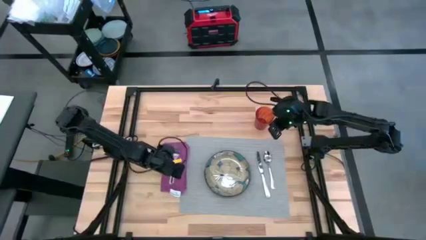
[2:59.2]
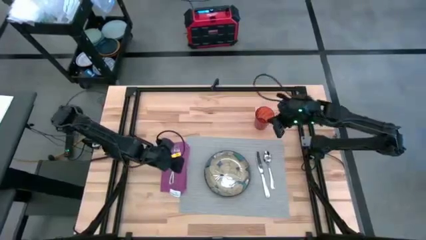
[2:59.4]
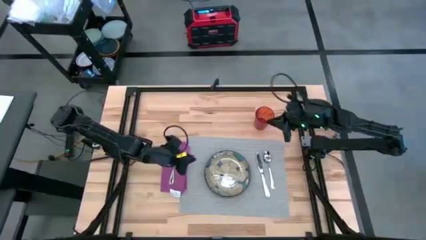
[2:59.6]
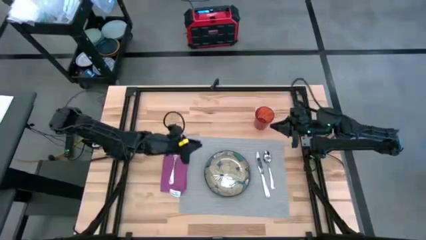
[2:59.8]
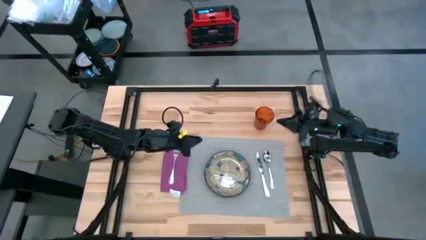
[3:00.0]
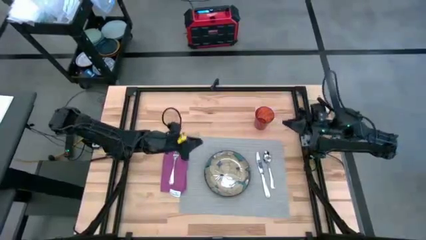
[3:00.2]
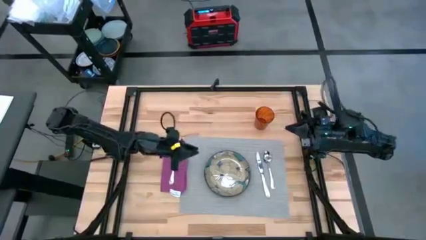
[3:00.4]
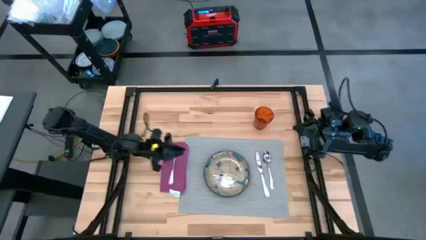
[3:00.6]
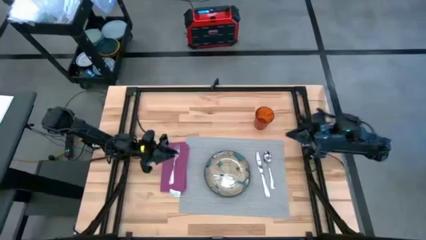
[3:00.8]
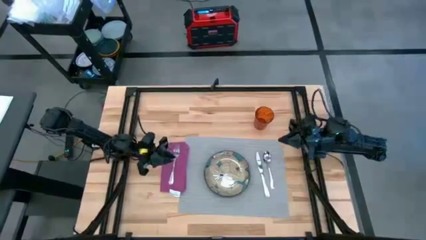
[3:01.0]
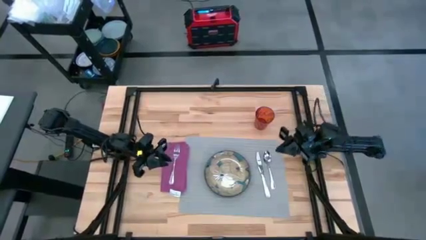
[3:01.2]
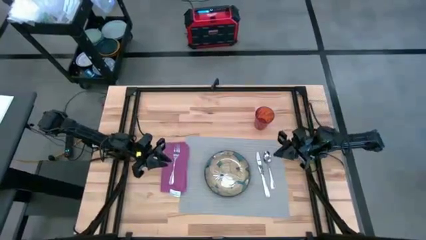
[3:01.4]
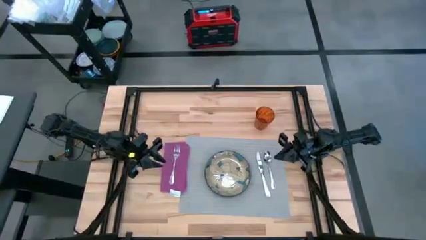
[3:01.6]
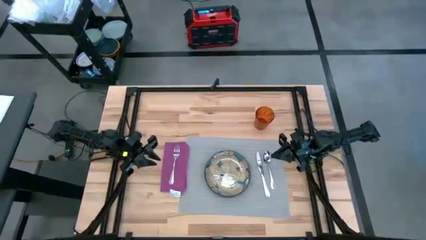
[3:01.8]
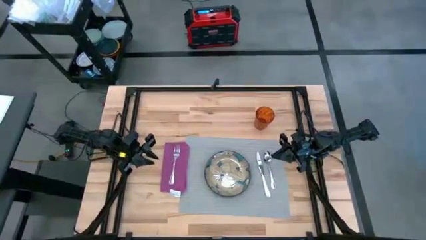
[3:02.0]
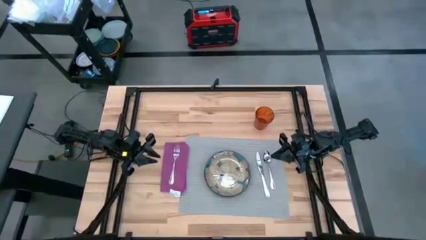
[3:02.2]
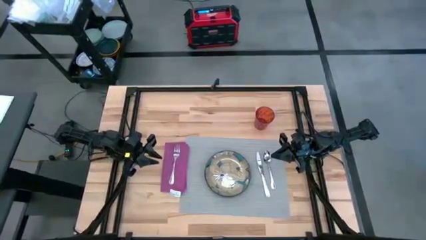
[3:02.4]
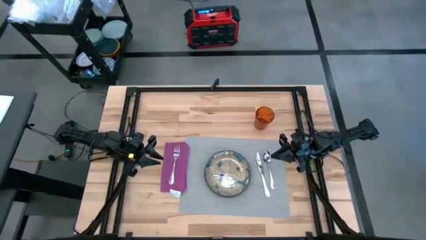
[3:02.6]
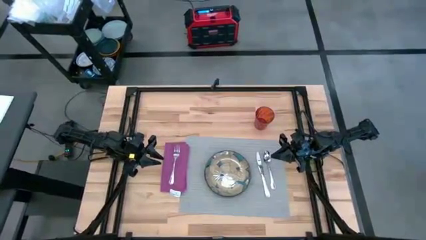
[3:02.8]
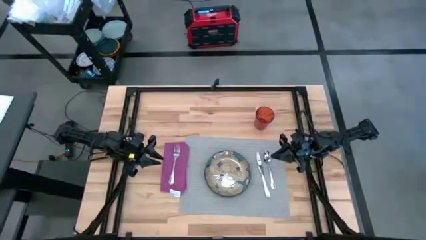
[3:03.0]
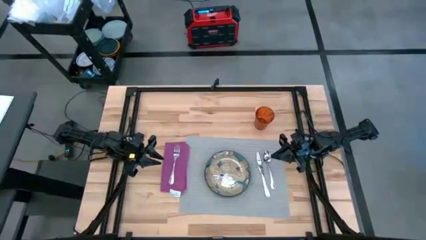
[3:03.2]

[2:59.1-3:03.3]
Task: Set table place
Return to Home Position

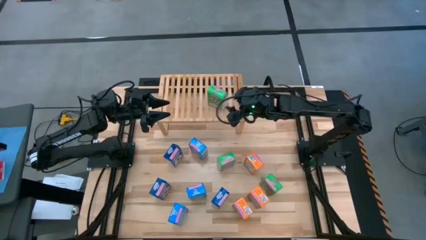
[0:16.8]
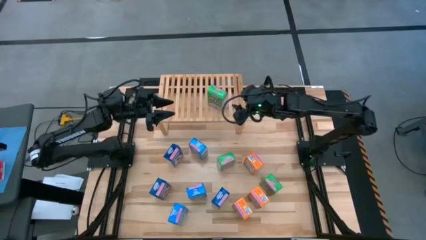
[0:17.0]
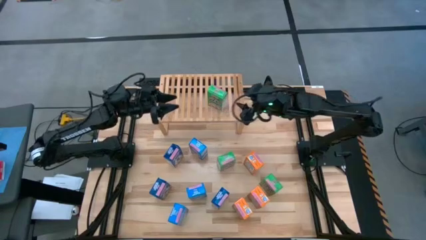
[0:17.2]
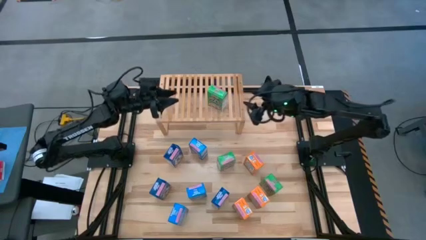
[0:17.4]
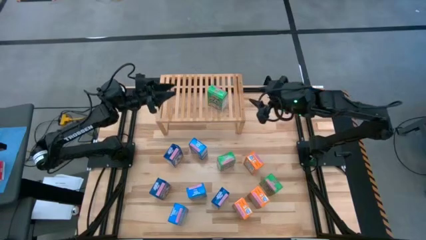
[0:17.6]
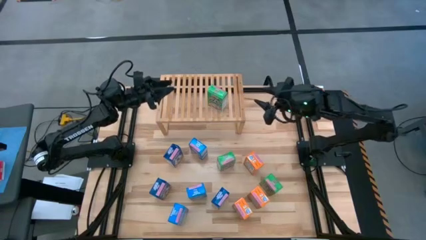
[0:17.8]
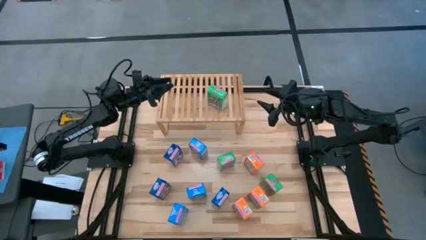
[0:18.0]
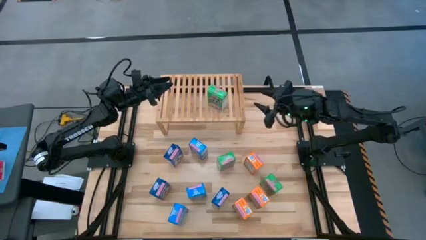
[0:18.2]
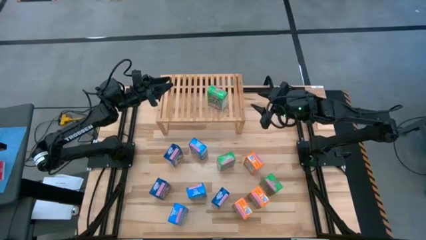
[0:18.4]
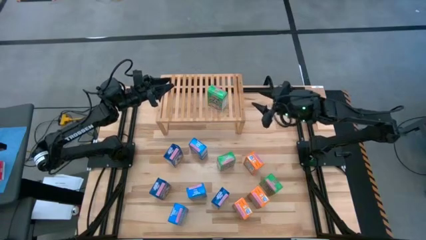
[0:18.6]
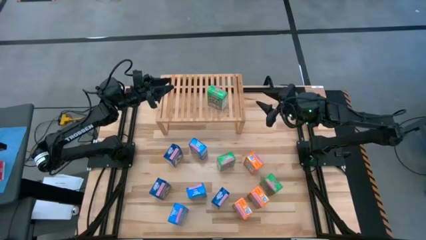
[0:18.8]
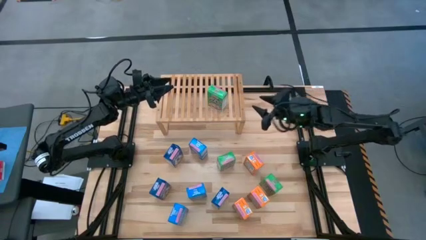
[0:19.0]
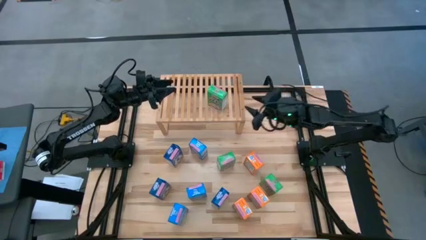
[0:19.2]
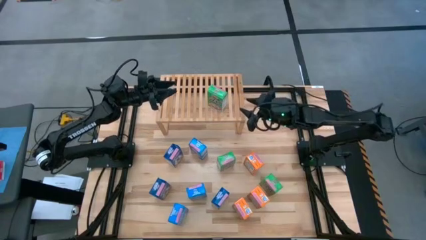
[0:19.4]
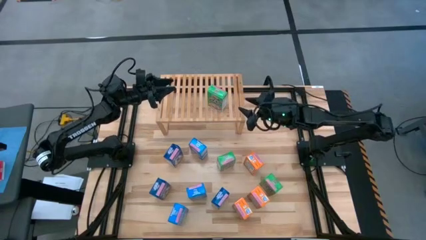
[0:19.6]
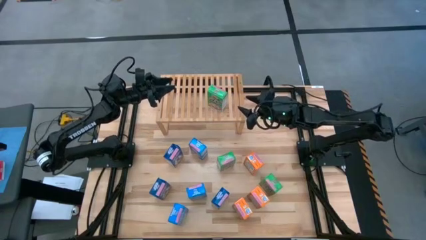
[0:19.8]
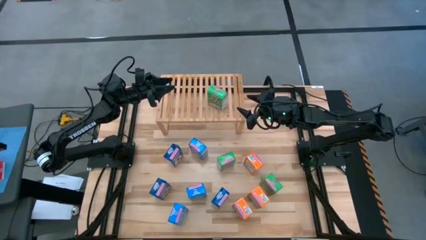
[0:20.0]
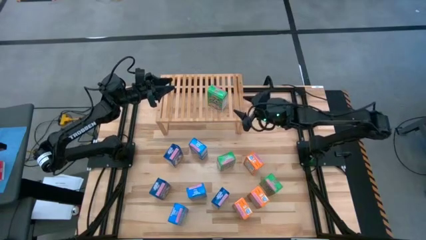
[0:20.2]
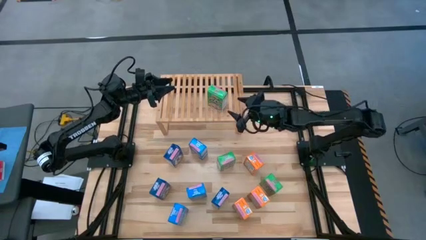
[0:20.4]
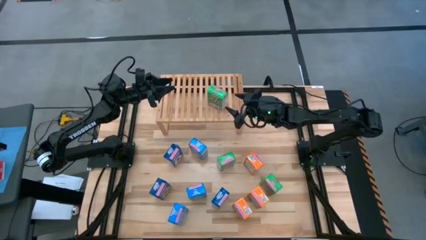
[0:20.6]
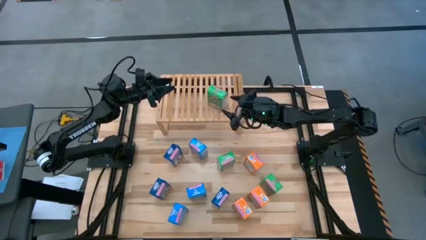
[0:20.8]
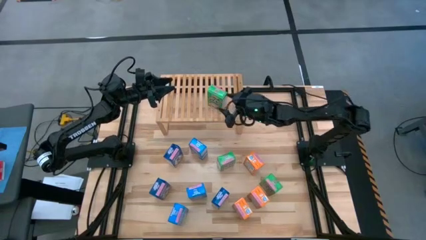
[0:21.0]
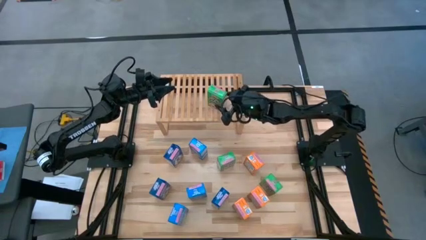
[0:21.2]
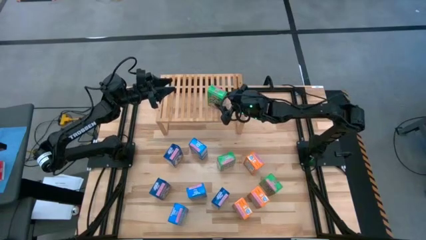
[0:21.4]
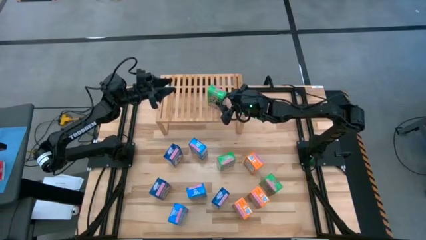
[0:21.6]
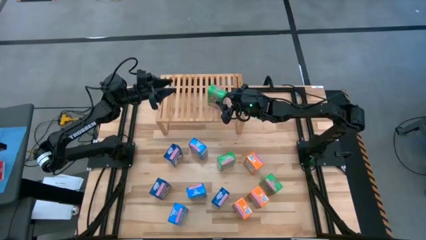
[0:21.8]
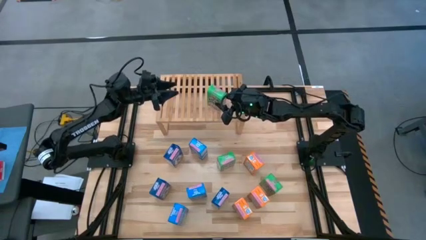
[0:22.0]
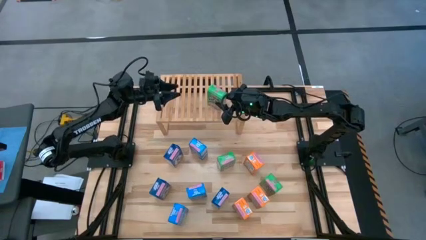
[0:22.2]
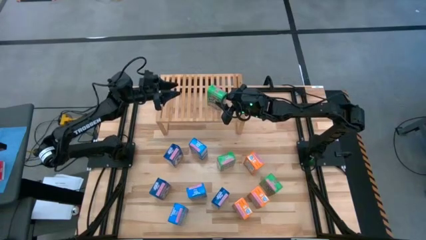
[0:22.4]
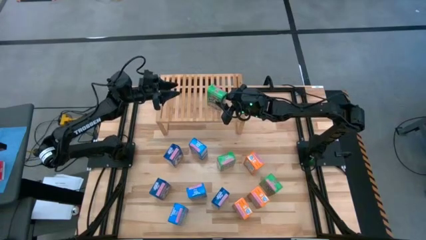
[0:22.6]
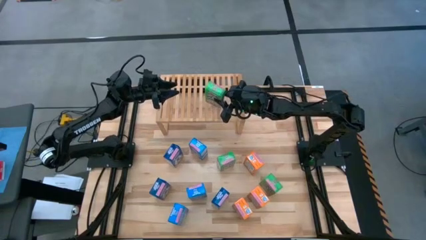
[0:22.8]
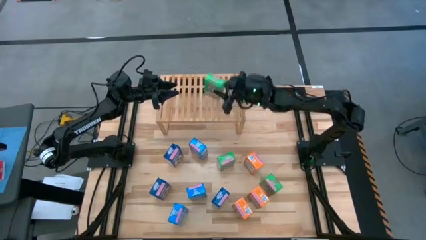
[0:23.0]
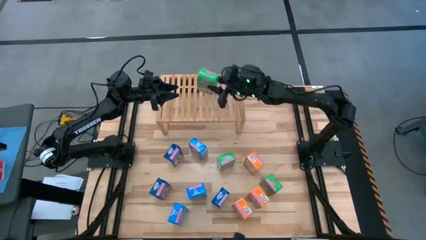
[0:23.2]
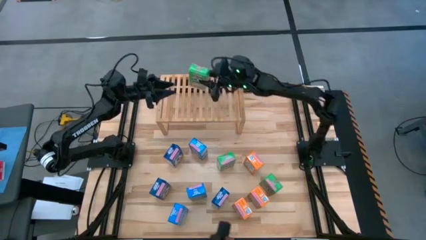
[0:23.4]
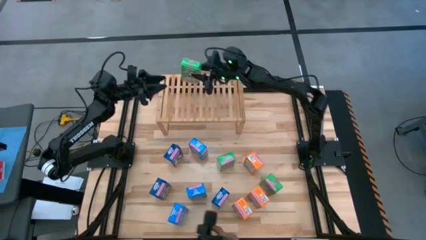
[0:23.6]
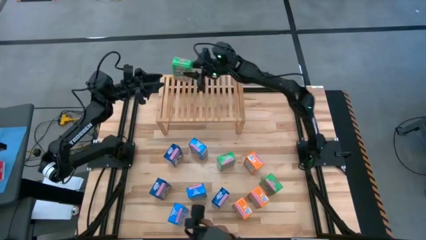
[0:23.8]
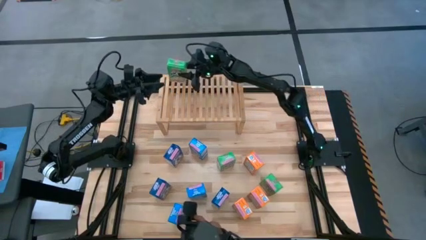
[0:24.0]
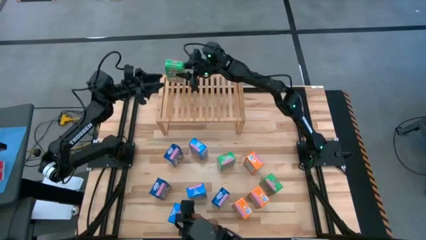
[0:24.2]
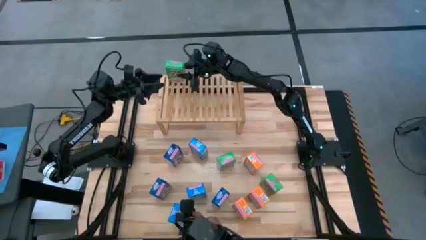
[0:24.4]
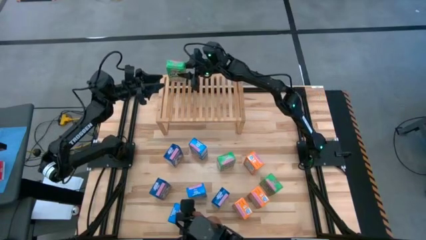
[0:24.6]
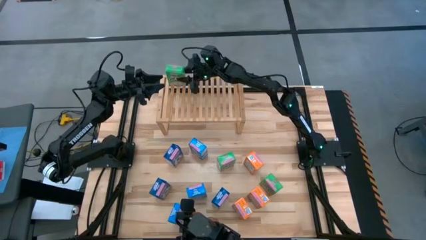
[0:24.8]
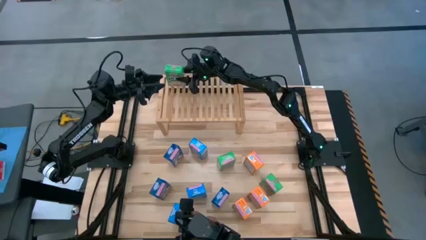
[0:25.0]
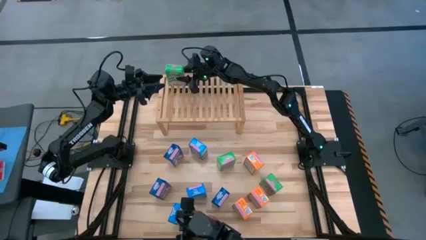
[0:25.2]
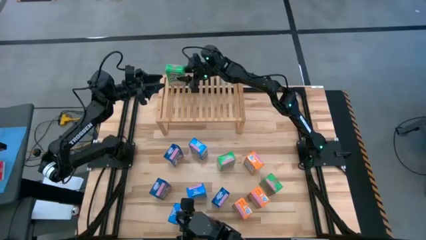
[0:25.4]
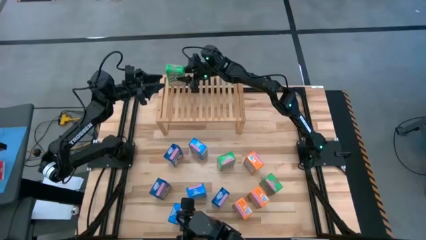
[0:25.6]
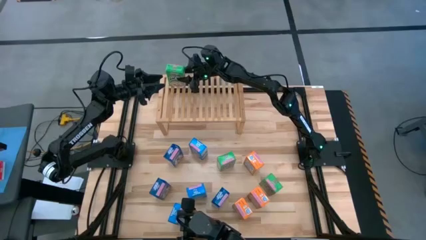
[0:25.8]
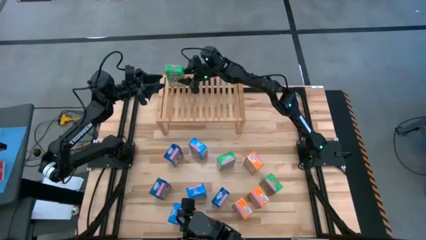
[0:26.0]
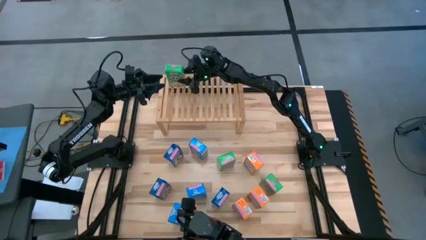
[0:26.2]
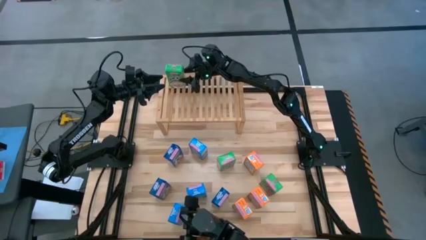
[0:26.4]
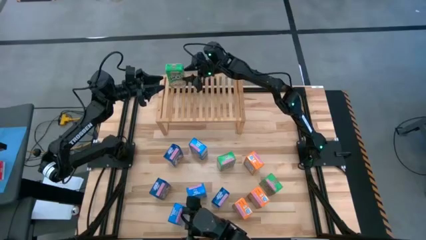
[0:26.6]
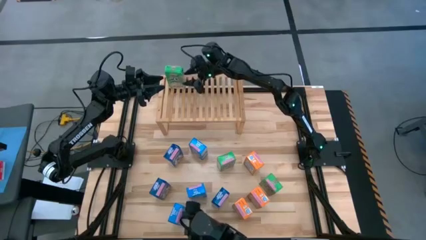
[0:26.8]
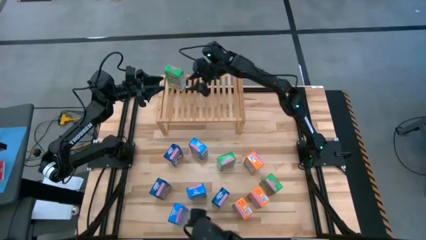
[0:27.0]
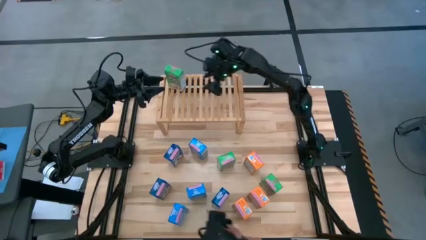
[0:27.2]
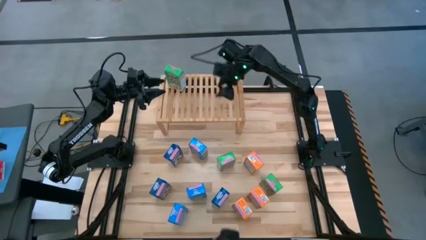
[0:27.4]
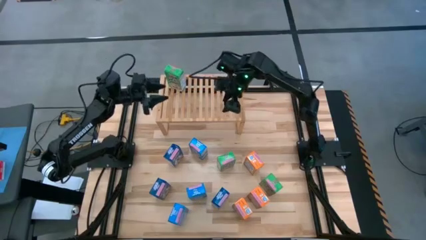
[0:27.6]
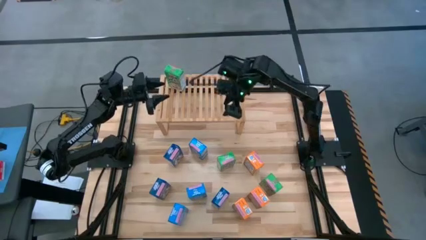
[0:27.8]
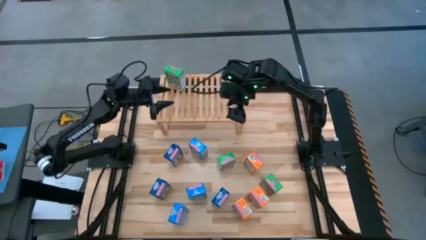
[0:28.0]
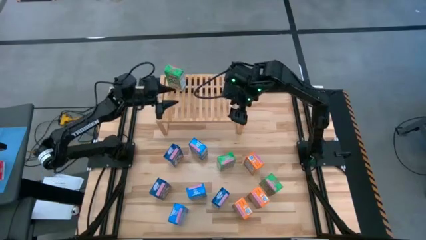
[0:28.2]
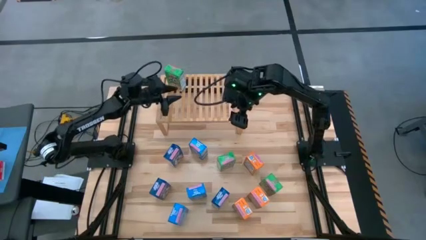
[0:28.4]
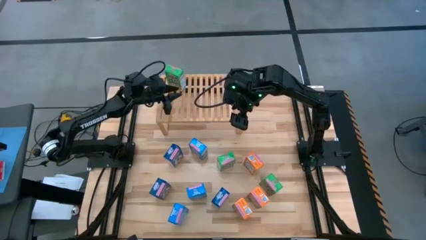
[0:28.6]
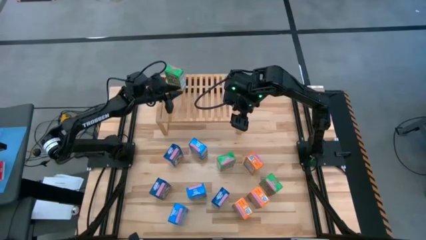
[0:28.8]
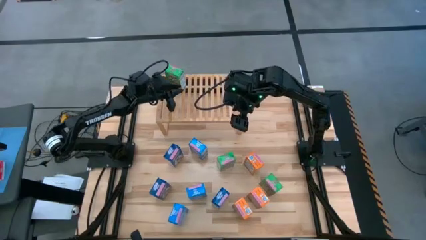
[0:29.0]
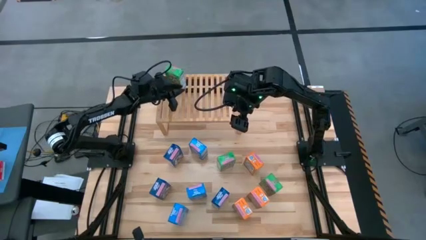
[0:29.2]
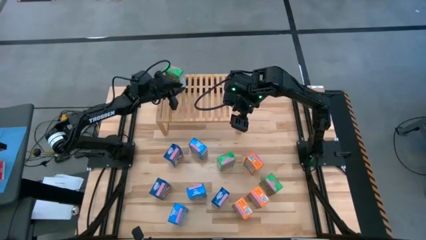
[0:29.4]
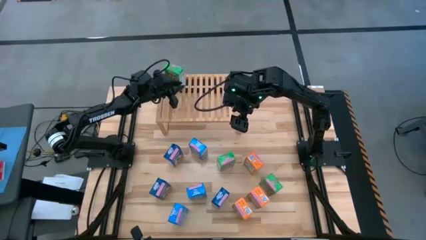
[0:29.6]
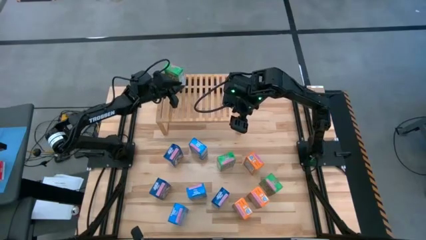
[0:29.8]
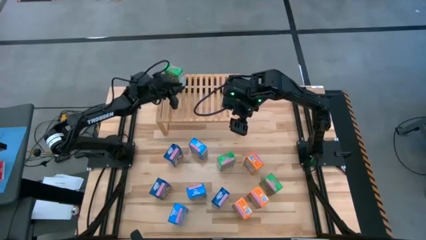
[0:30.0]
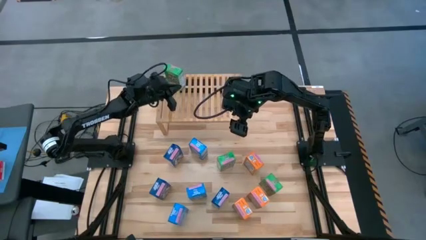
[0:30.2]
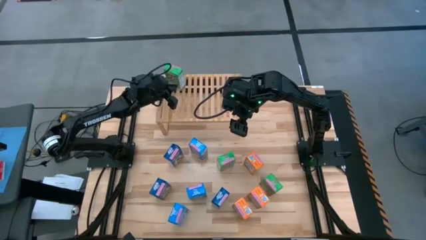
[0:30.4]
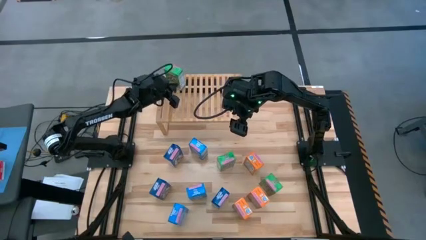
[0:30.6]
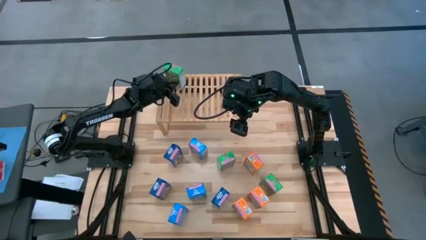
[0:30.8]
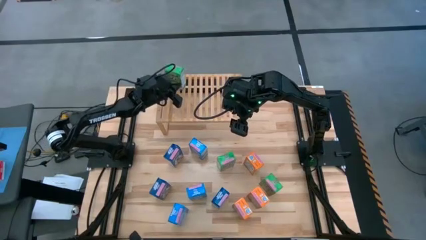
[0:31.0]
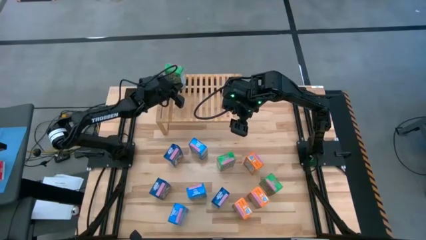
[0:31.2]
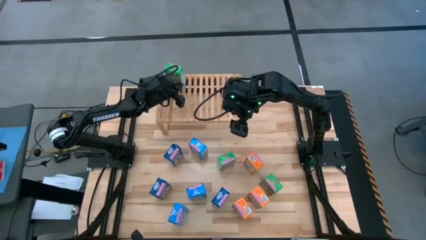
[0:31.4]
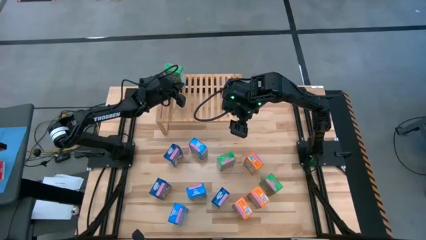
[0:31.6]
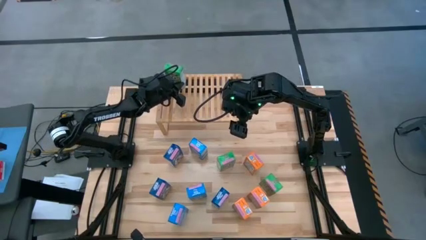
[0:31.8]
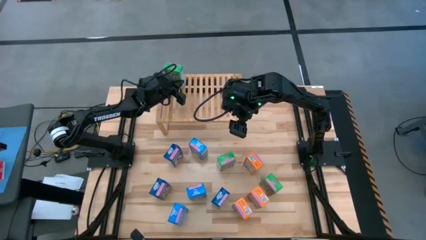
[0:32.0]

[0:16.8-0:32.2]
Task: Stack cereal on shelf
Put the top right green cereal box on the shelf
